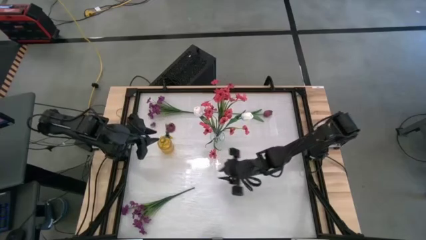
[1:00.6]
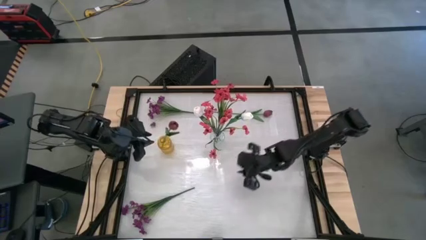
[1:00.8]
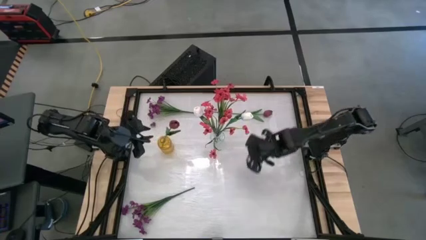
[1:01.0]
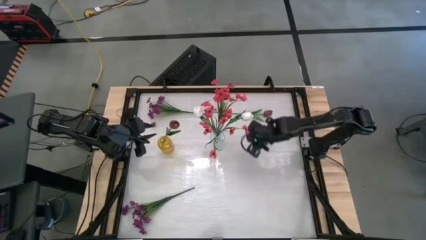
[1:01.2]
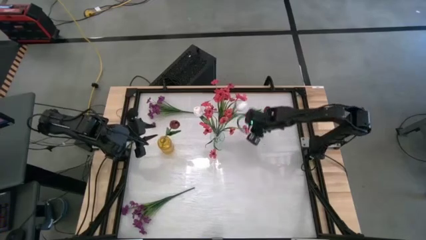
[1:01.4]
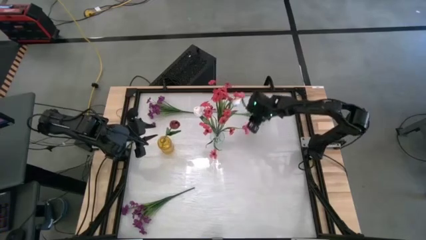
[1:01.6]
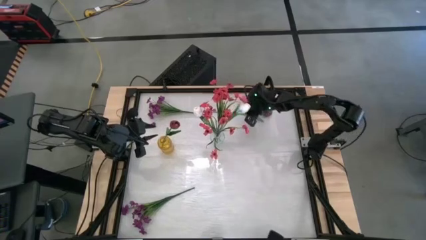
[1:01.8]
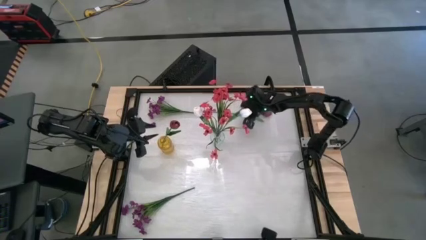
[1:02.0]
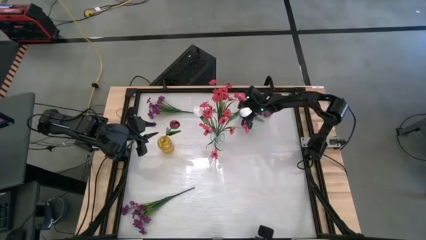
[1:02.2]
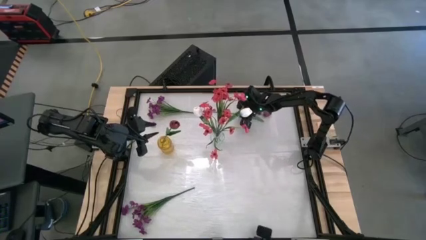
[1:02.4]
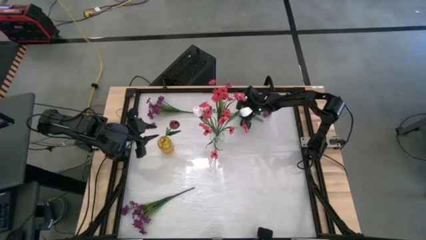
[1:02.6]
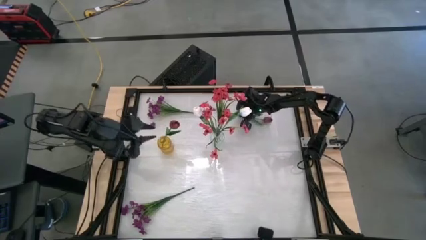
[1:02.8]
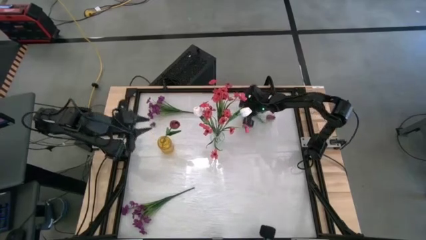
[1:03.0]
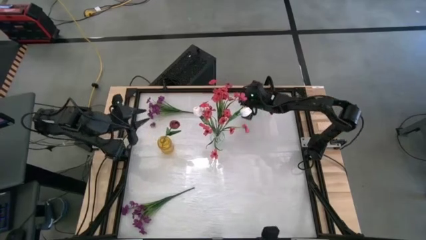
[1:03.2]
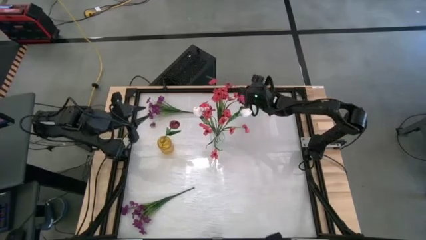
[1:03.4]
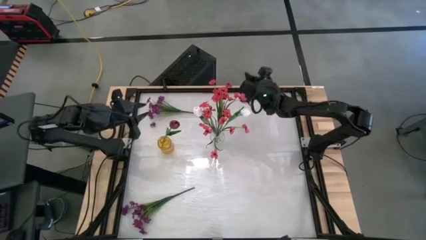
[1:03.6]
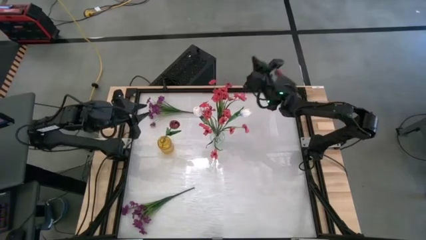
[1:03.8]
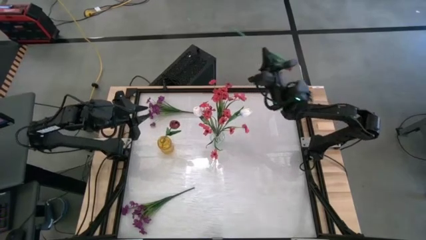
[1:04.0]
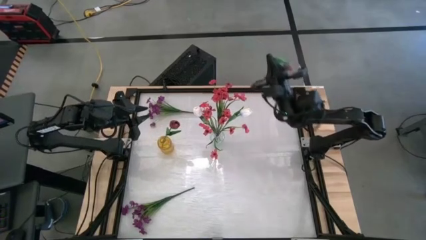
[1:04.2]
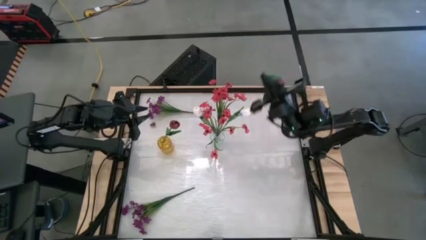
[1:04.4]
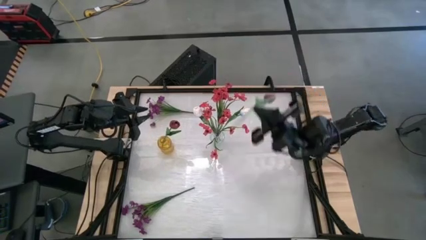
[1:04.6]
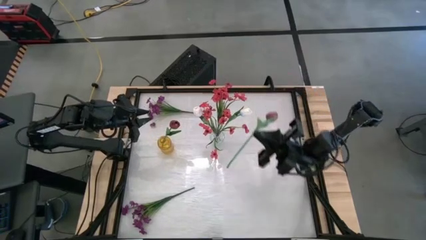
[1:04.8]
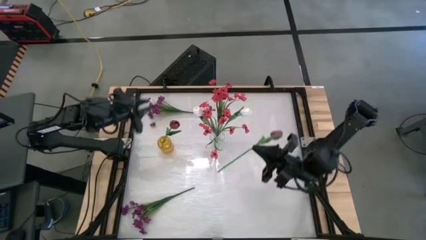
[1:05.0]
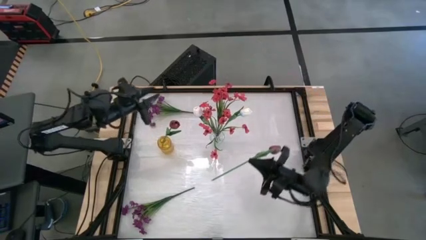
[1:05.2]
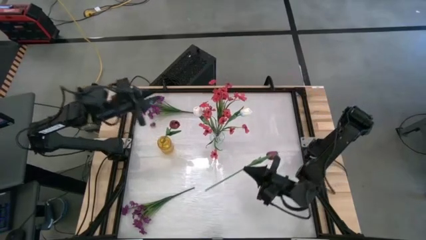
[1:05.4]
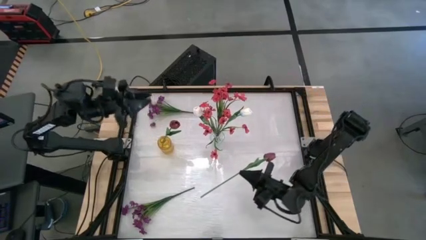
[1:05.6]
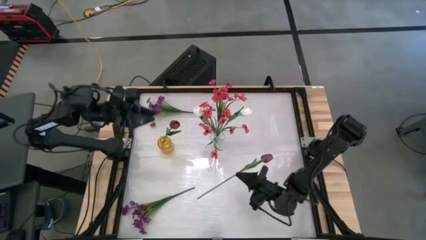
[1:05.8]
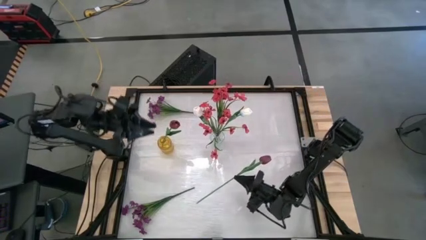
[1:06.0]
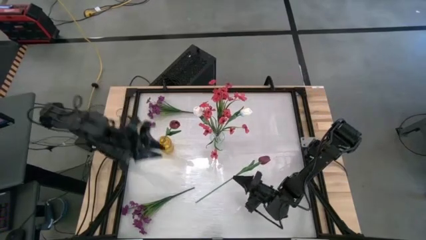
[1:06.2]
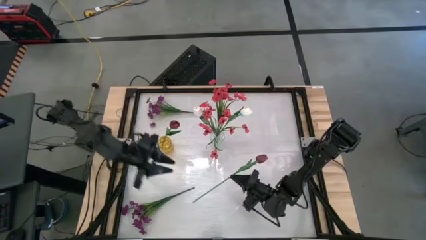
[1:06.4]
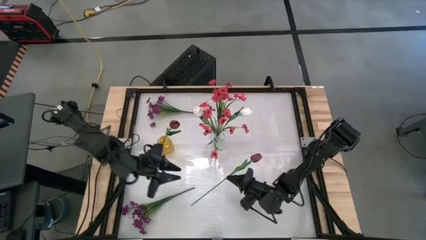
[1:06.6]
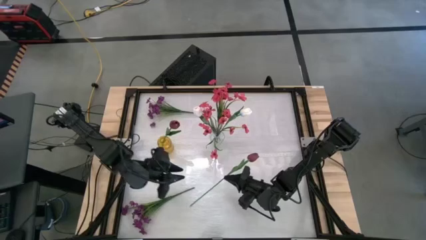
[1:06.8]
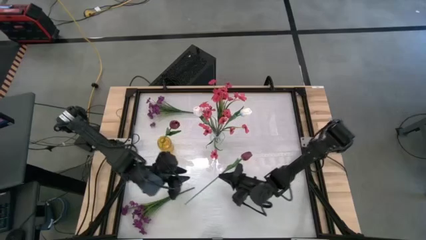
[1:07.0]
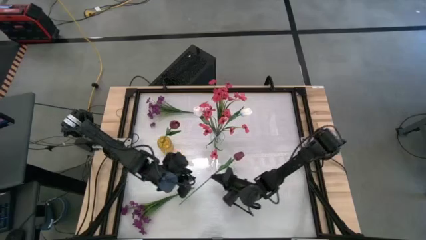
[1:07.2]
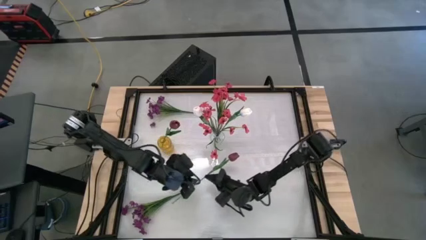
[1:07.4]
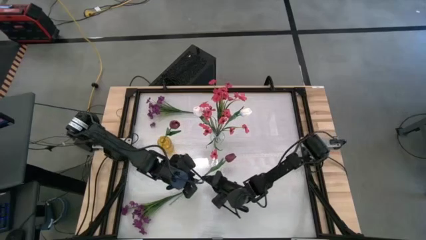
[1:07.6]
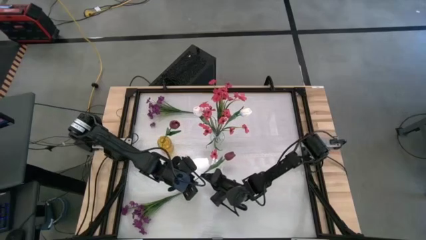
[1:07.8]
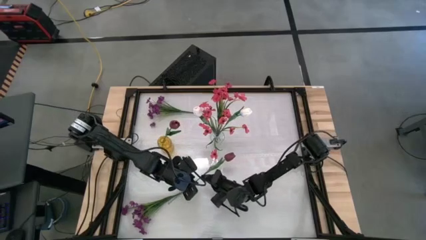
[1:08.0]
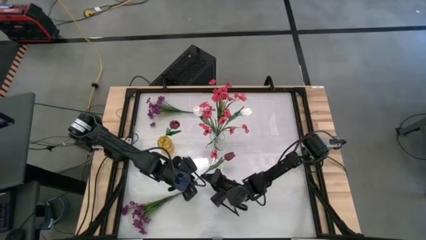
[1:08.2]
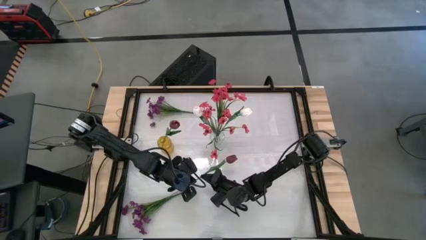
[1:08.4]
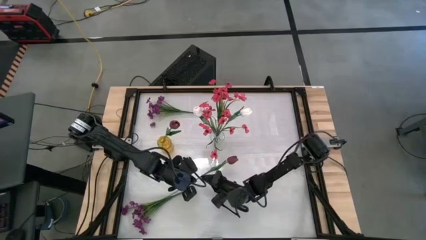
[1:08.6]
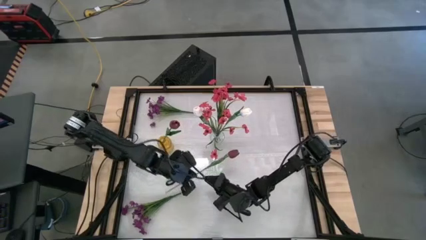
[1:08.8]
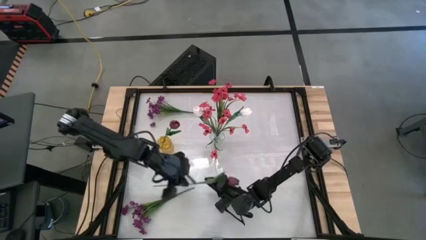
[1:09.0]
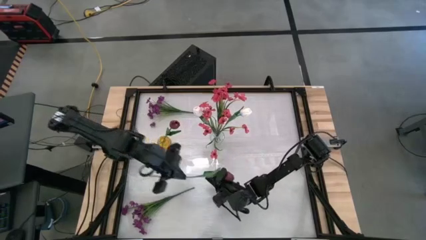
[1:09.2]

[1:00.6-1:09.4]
Task: Sort flowers into vase by color
Put the red tulip into the yellow vase

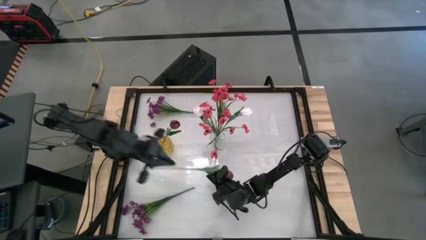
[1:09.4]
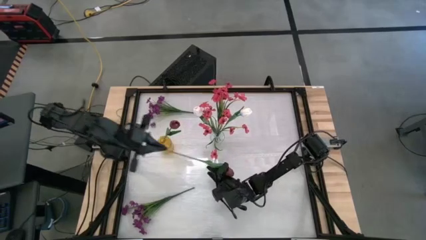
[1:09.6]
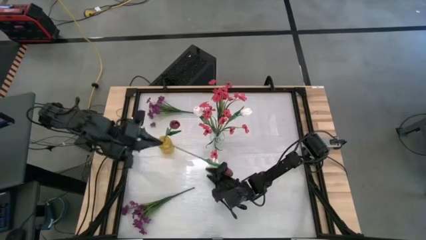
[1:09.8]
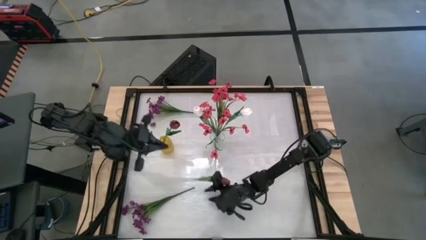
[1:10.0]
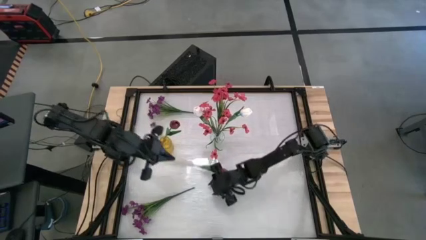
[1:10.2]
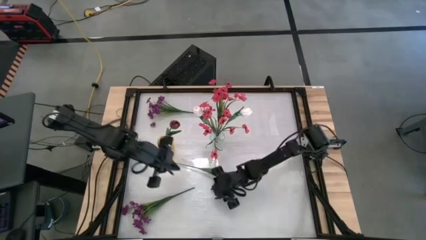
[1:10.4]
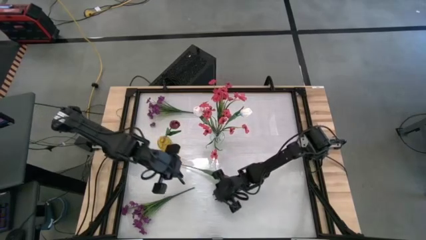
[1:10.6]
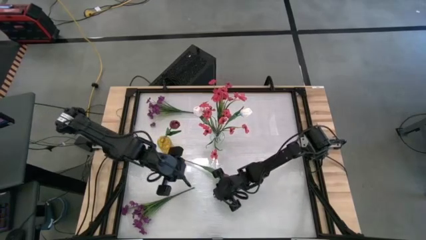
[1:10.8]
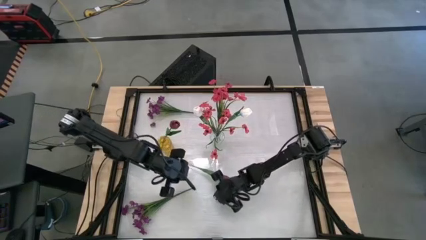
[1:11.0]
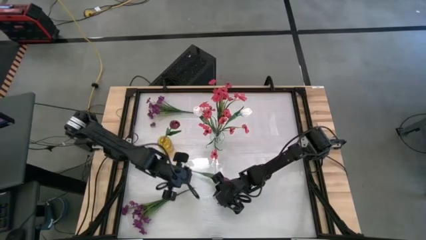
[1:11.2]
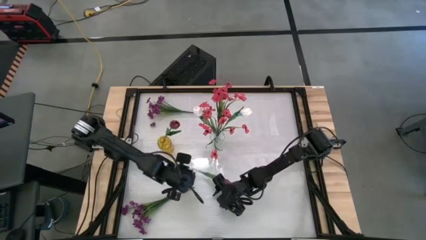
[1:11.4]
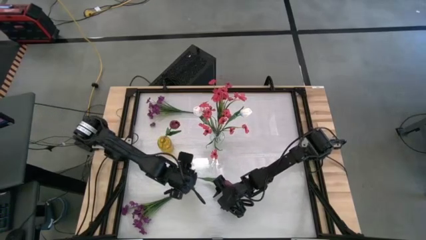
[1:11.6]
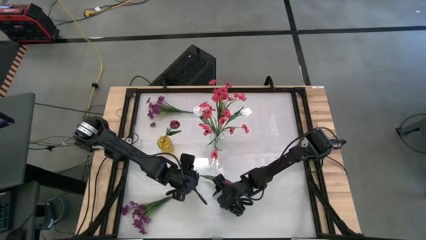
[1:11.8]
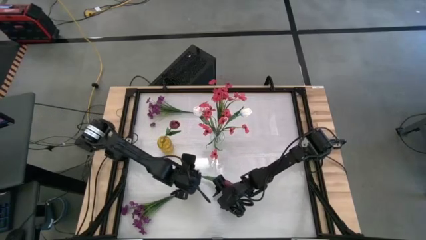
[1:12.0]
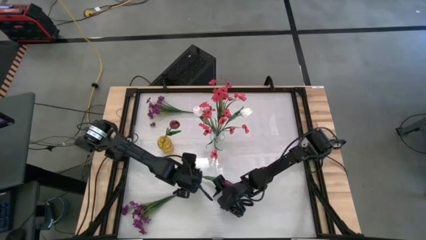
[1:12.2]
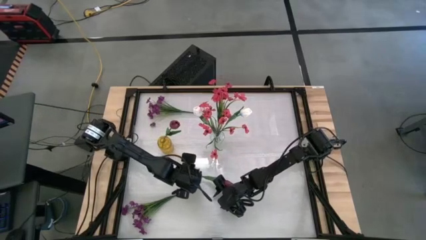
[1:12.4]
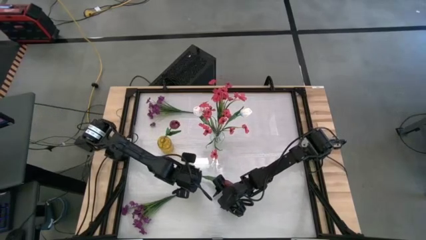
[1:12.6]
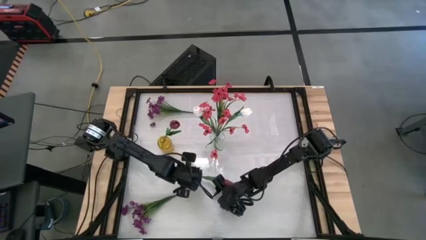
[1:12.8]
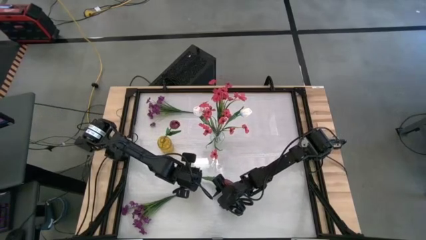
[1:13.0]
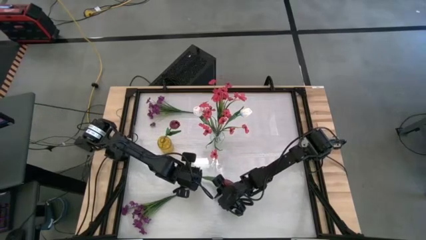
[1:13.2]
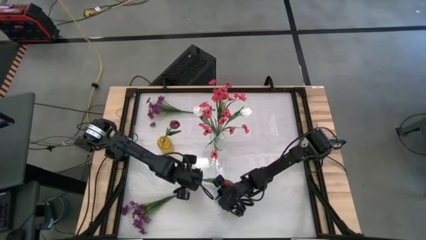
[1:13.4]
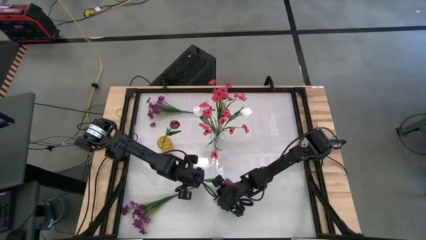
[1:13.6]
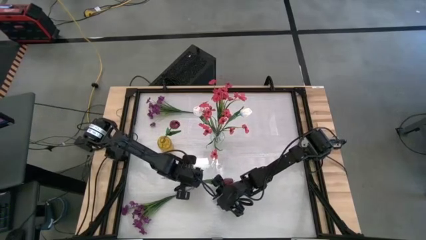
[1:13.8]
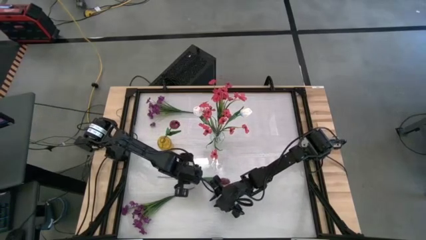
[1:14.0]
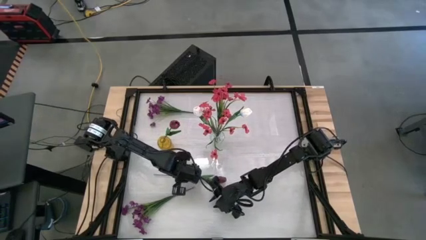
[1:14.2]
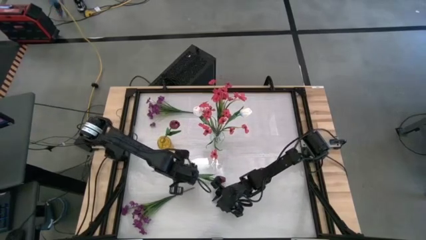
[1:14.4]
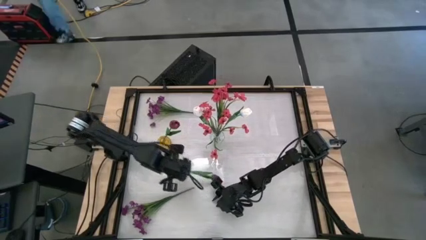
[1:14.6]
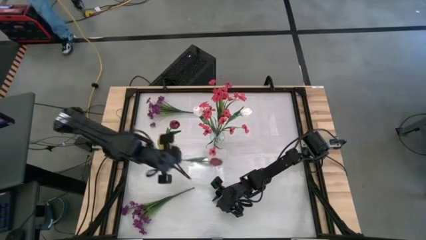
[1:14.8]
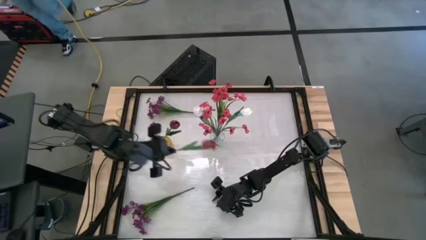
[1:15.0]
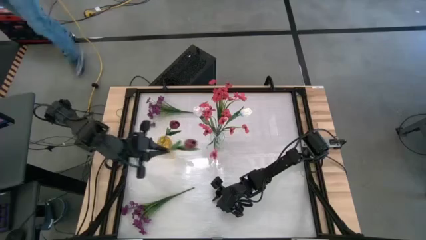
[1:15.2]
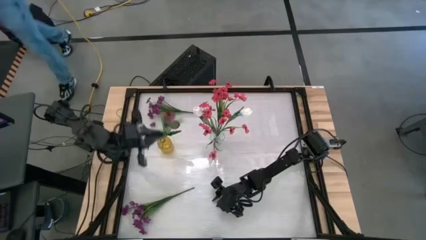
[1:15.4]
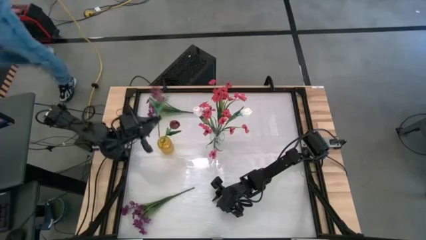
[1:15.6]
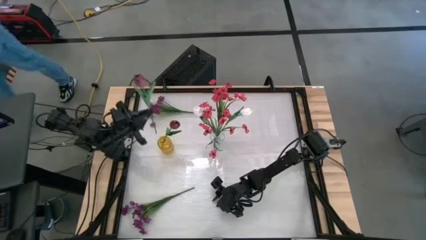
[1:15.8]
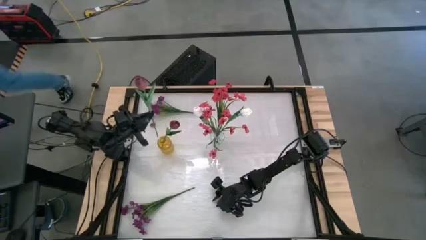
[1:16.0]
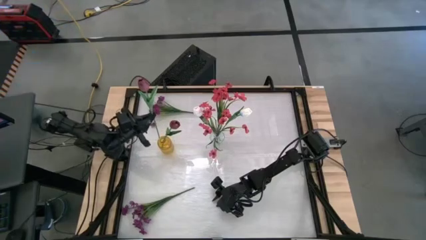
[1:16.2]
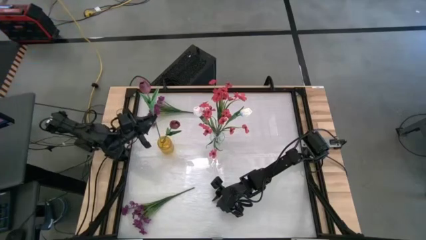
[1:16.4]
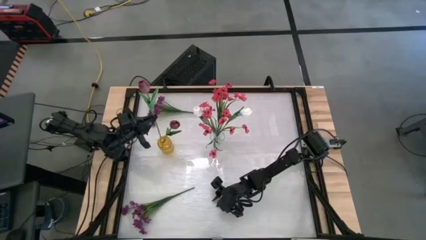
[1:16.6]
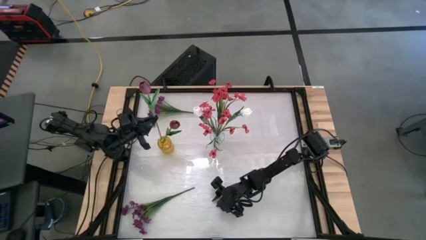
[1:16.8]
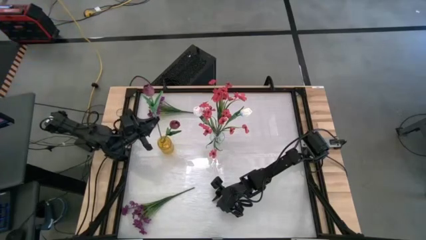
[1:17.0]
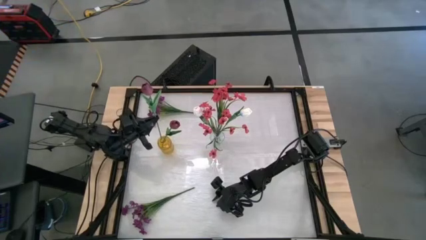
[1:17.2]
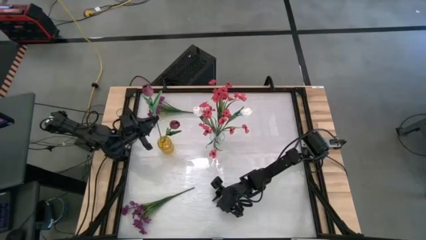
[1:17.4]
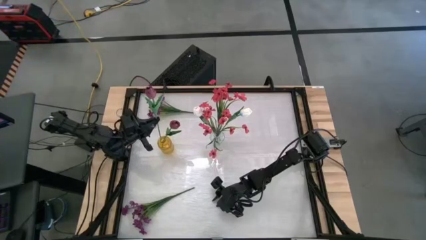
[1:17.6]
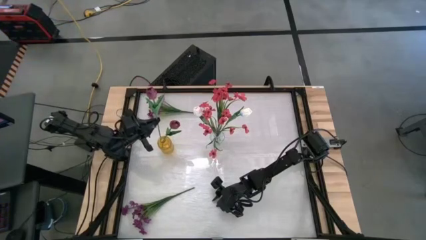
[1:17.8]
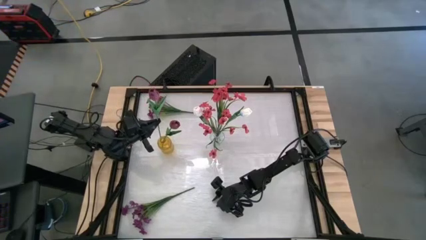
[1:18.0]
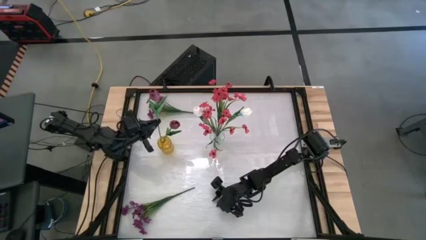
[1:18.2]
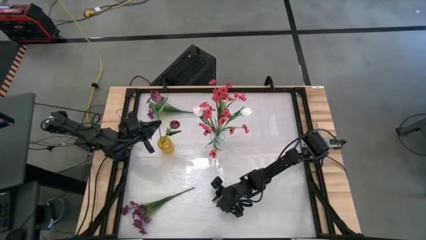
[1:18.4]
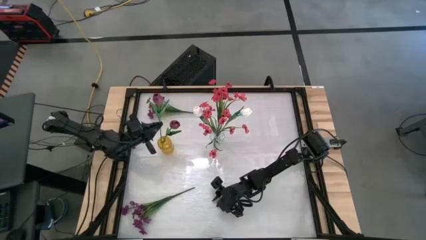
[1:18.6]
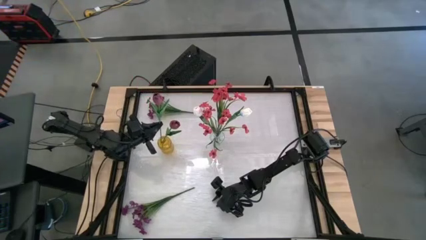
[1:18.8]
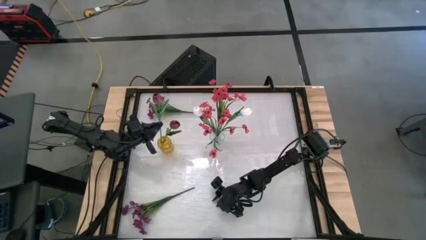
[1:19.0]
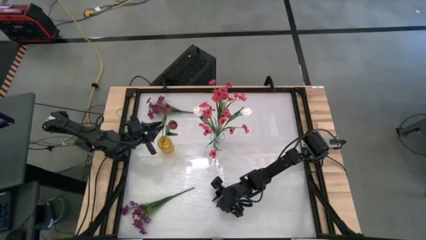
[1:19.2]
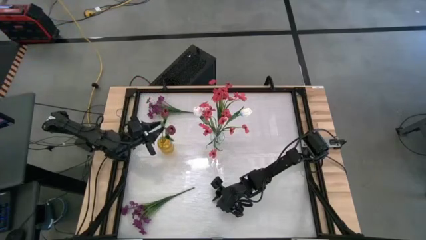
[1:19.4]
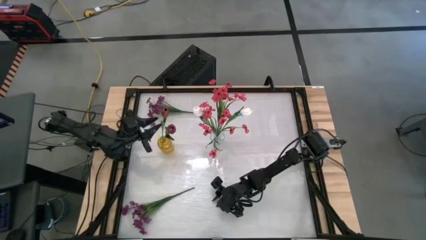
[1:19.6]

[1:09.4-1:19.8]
Put the red tulip into the yellow vase
